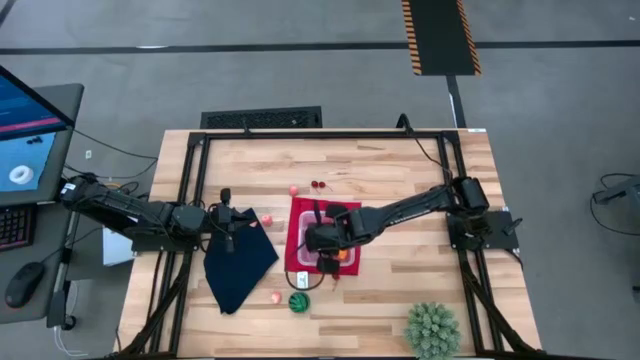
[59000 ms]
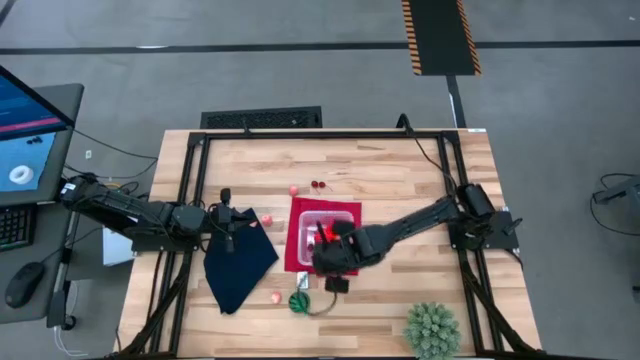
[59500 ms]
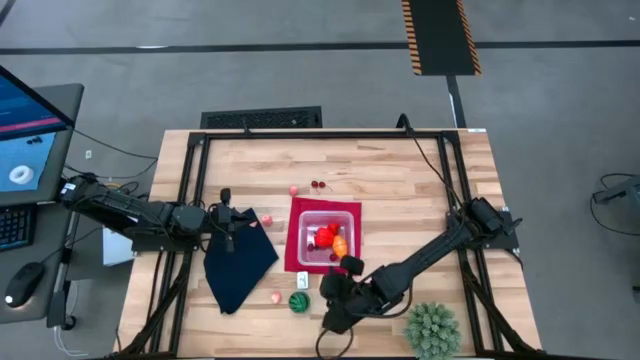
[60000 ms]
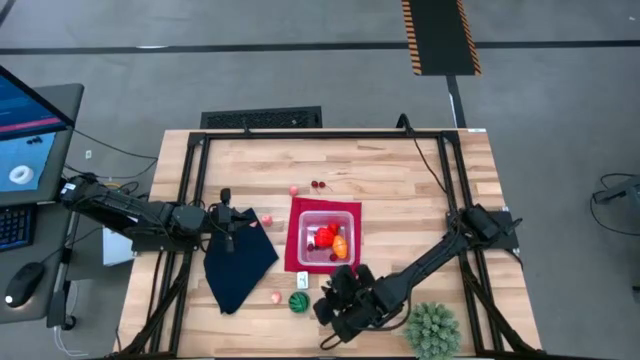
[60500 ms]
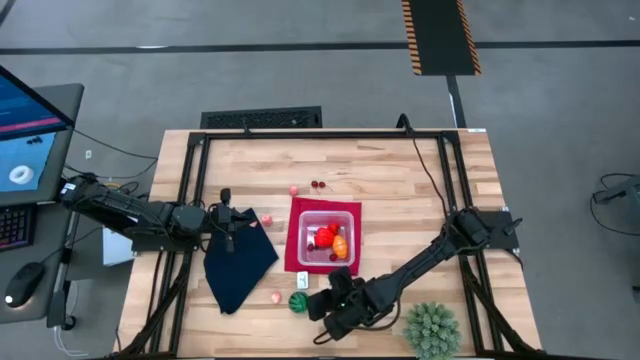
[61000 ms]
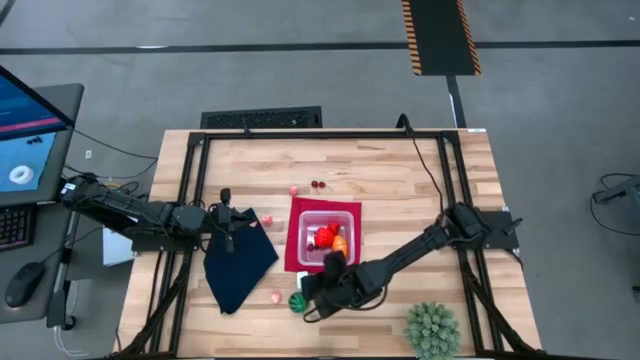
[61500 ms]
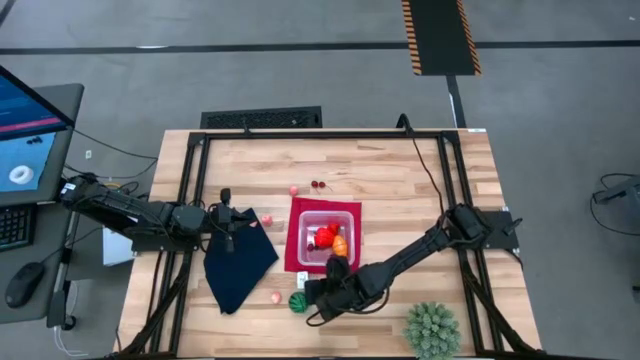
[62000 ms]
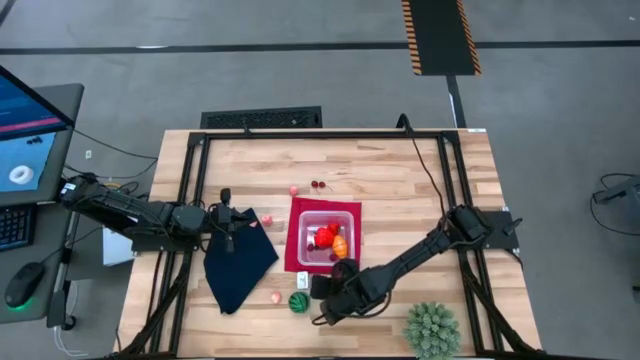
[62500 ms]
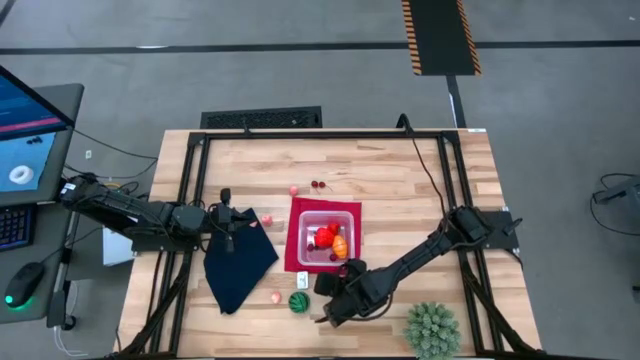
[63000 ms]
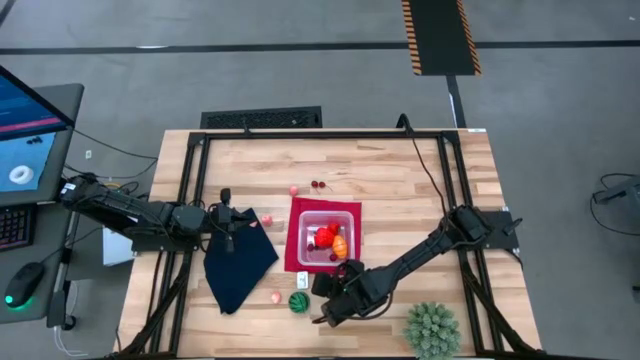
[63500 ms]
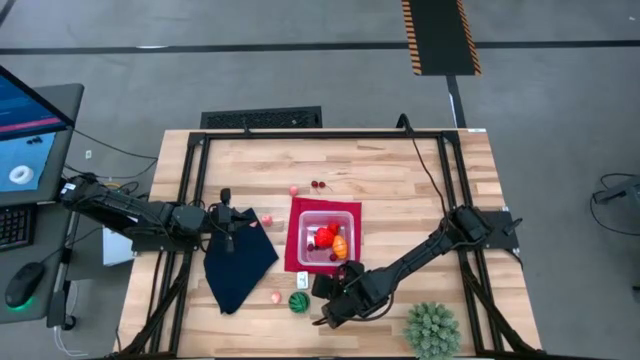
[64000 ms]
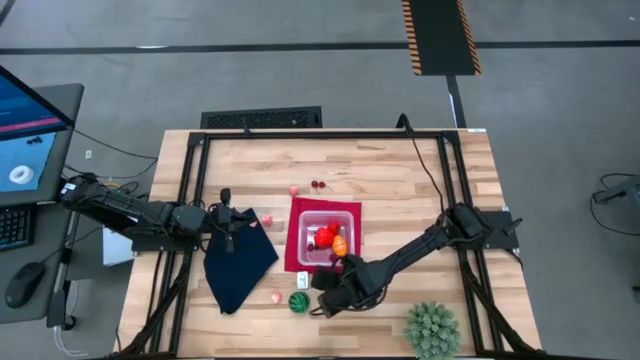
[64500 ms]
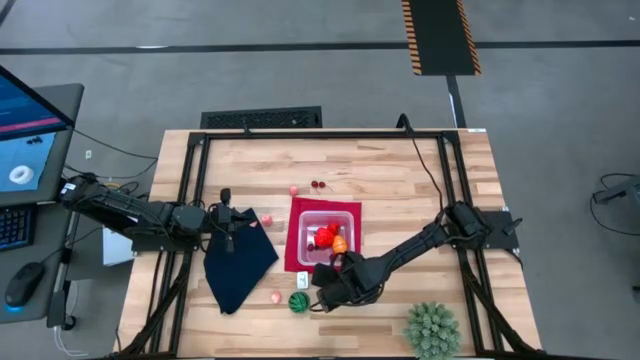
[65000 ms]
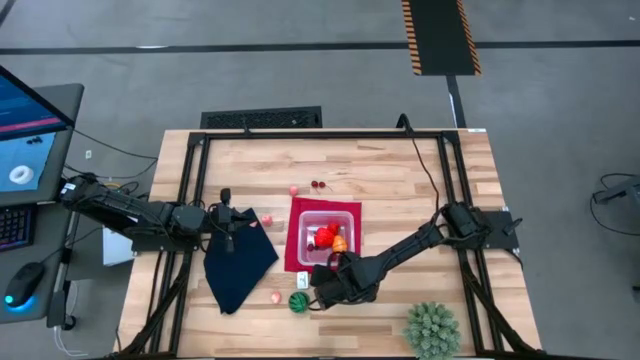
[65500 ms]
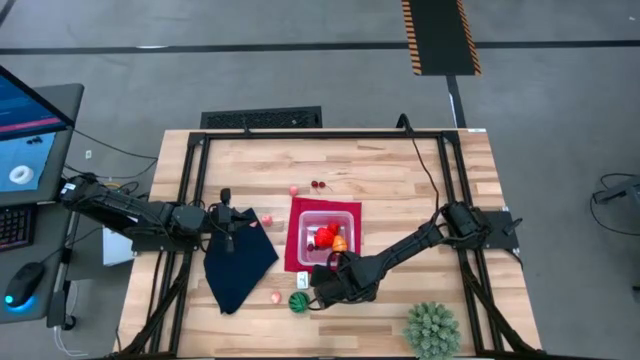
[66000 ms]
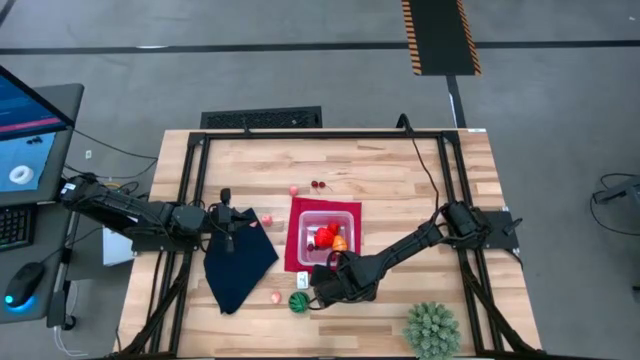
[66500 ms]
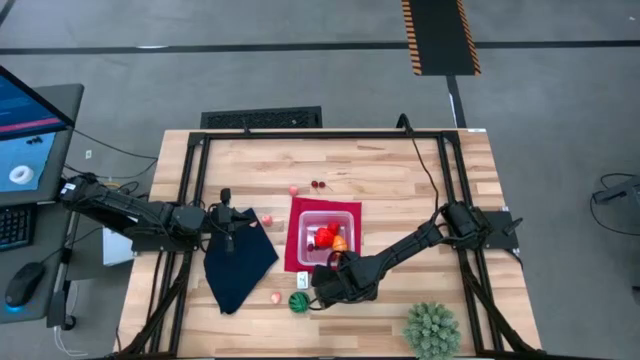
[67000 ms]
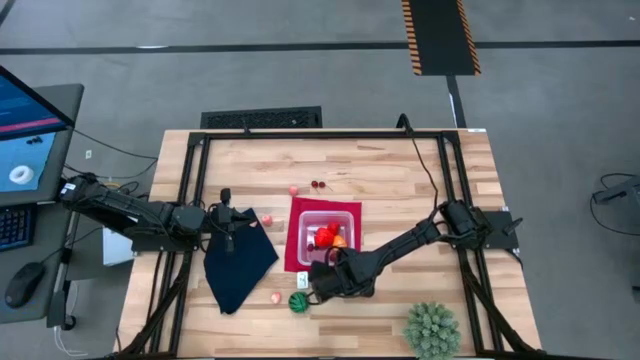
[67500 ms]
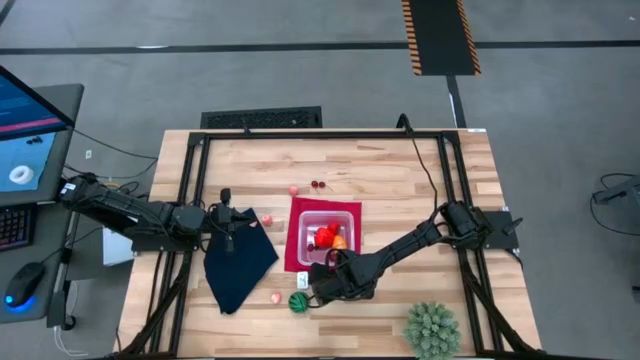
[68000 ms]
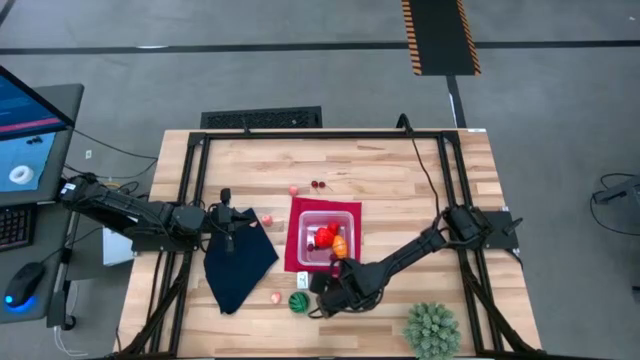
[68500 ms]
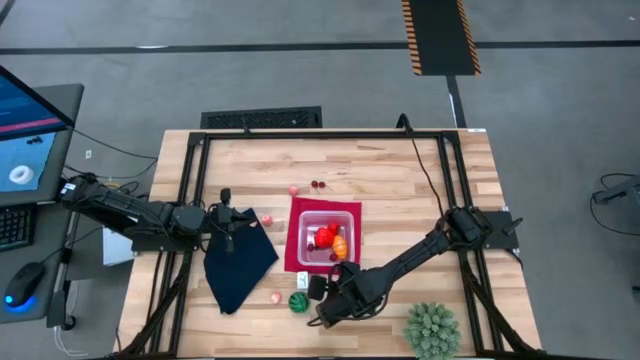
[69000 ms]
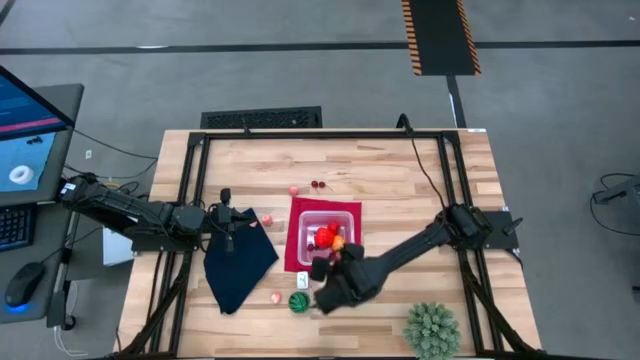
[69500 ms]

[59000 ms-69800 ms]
Task: Pick and placing Produce into tupperware
Put the cherry in the transparent bin

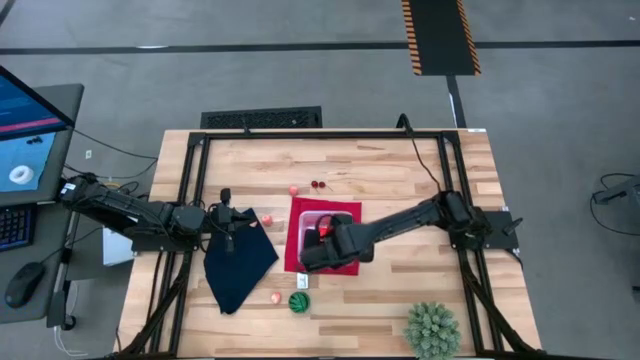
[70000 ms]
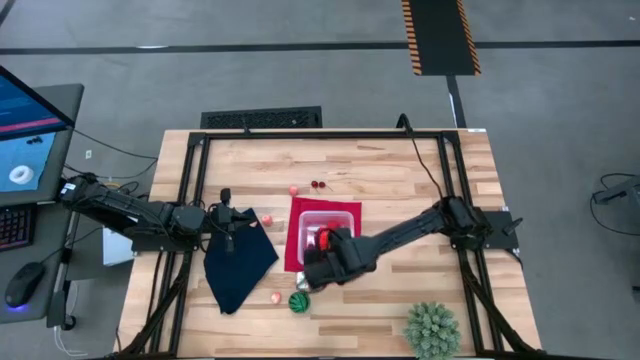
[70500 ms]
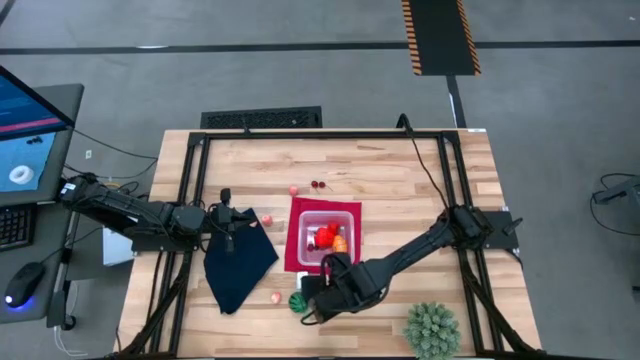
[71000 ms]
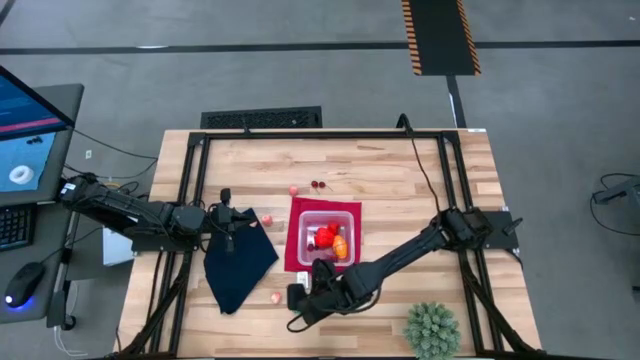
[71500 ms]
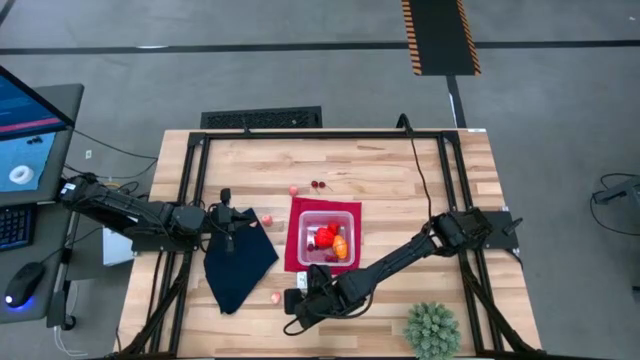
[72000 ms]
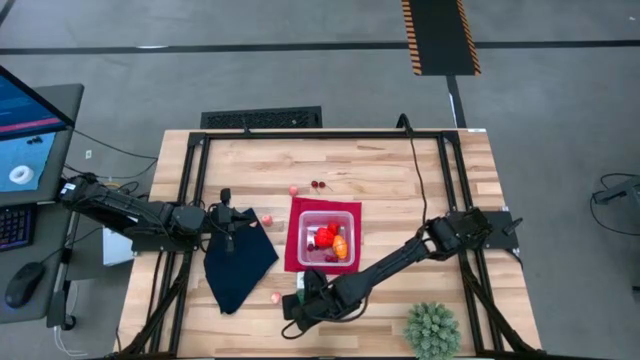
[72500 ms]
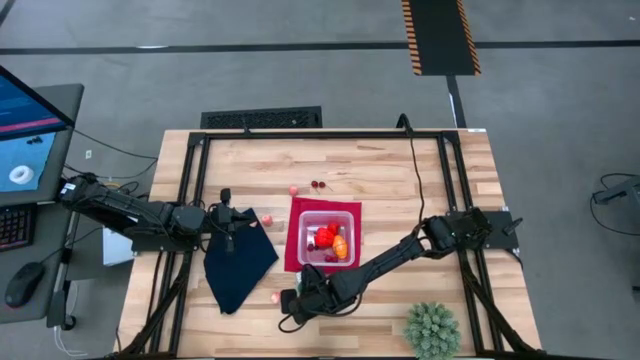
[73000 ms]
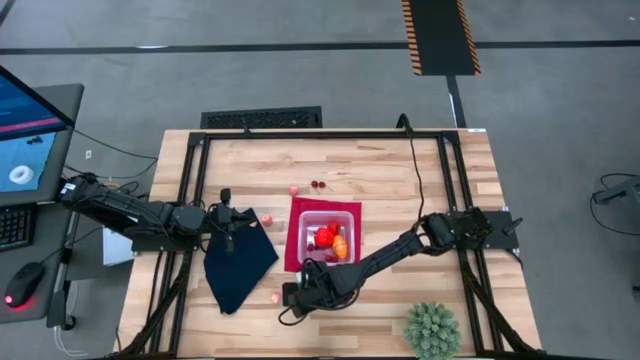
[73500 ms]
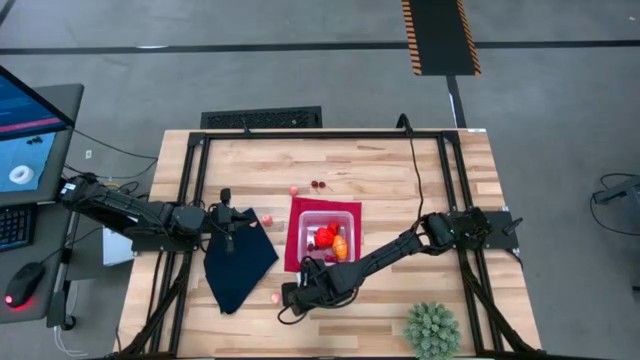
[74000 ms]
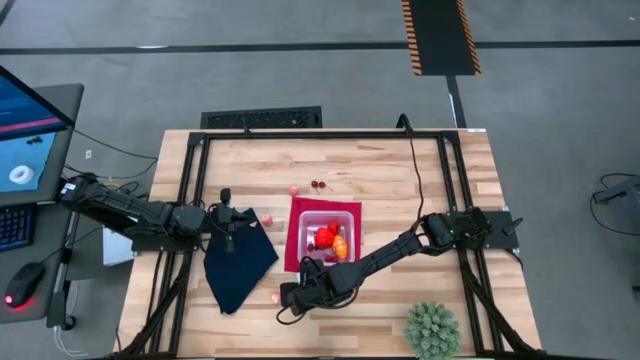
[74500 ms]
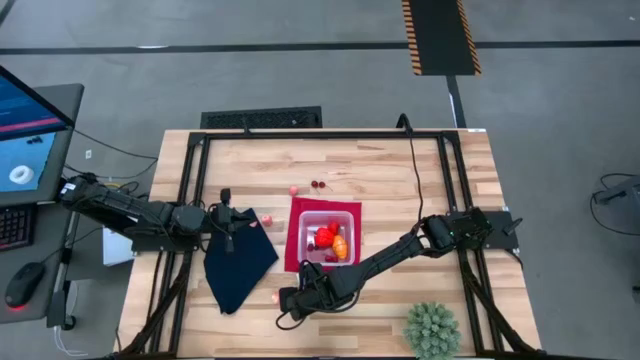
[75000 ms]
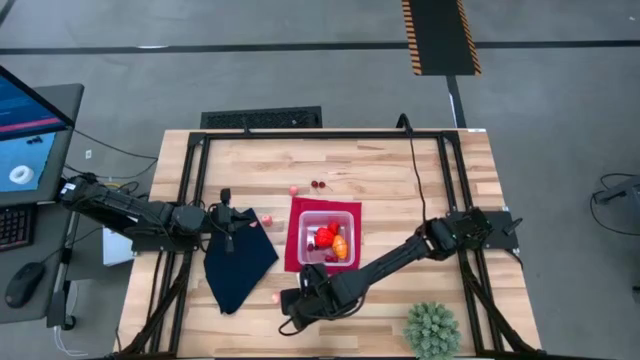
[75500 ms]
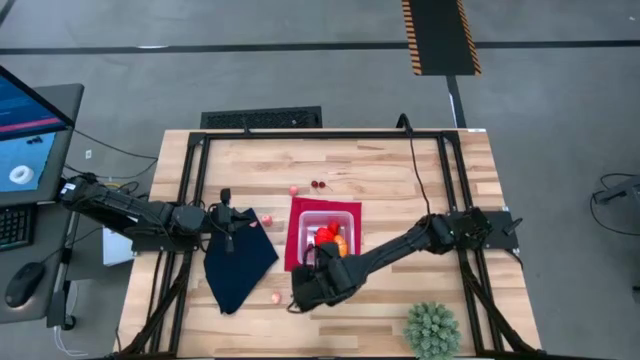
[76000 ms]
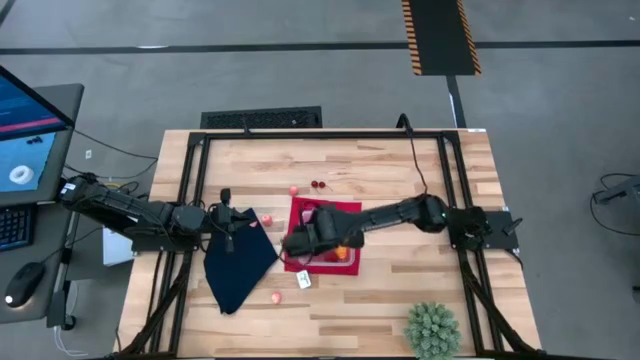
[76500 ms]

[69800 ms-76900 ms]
Put the watermelon in the transparent bin

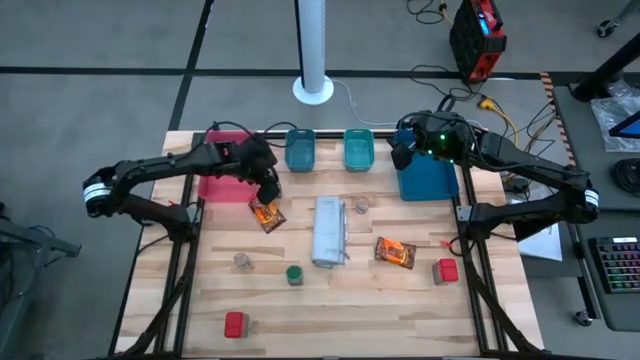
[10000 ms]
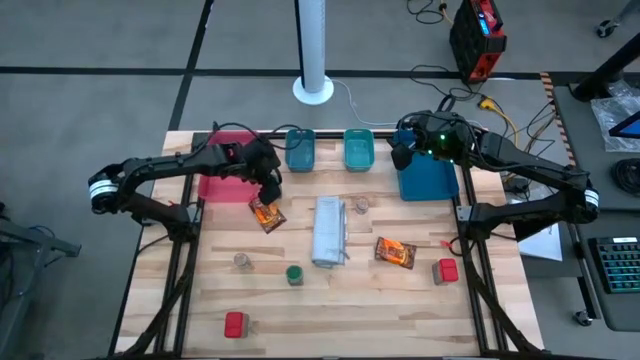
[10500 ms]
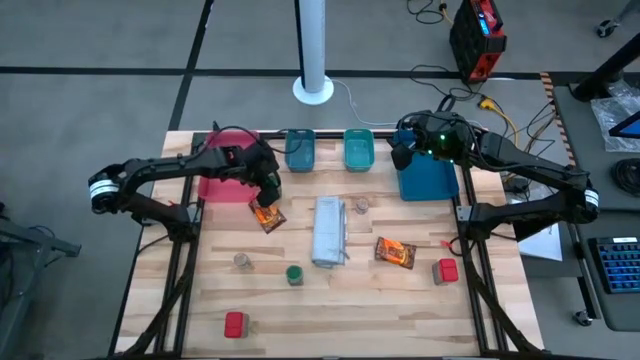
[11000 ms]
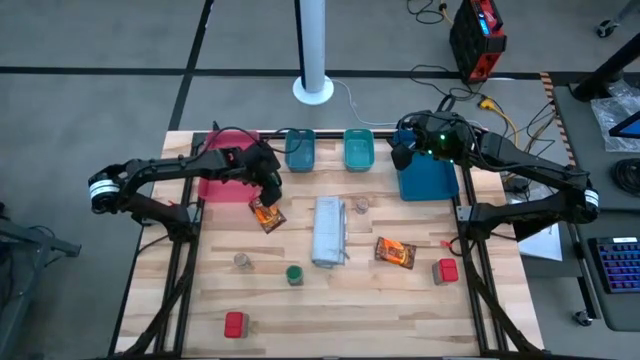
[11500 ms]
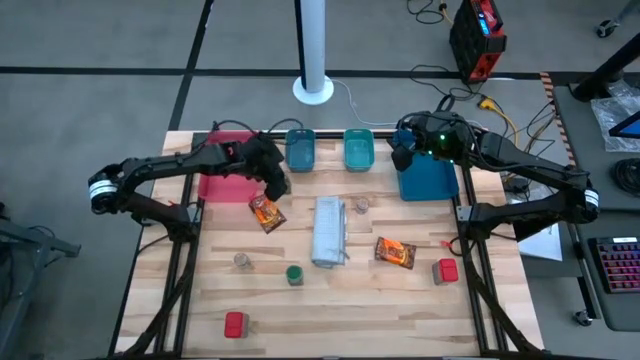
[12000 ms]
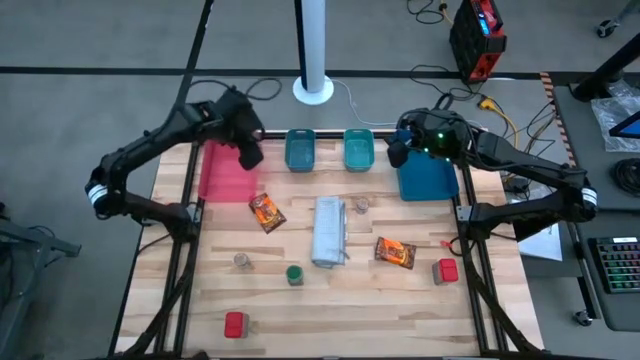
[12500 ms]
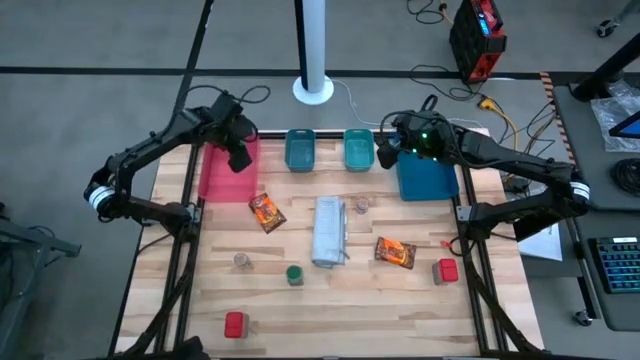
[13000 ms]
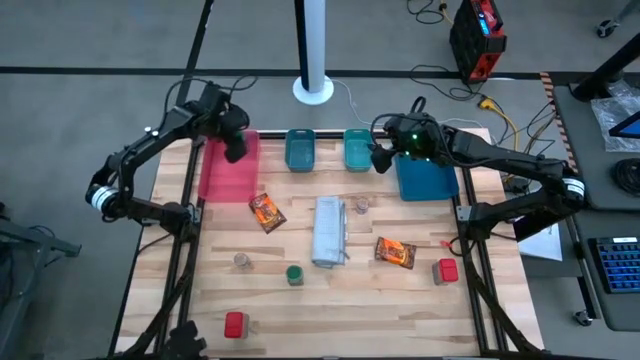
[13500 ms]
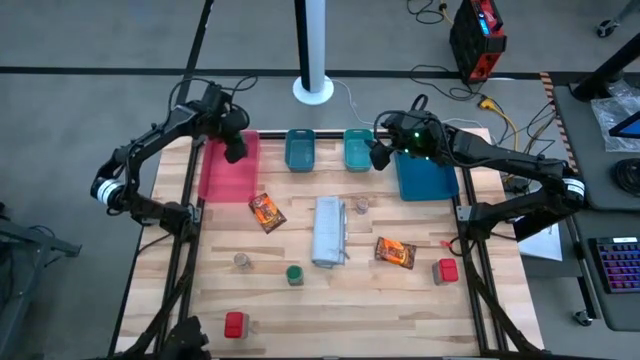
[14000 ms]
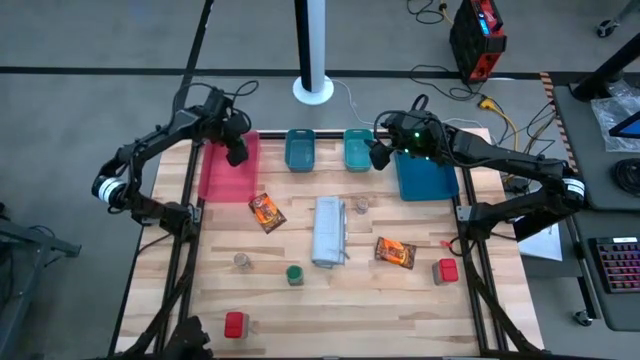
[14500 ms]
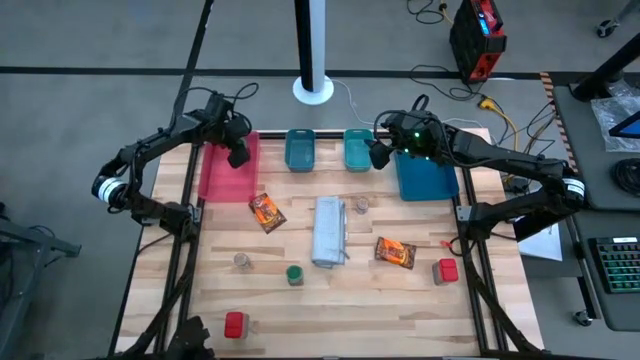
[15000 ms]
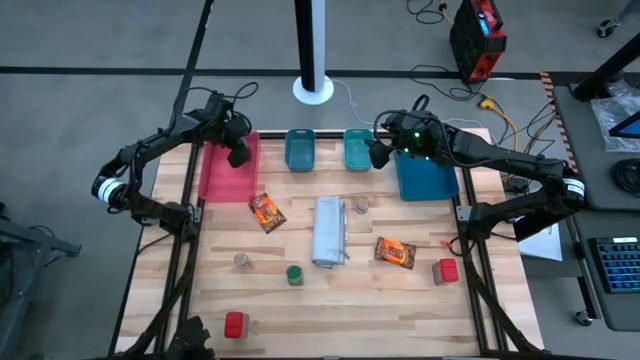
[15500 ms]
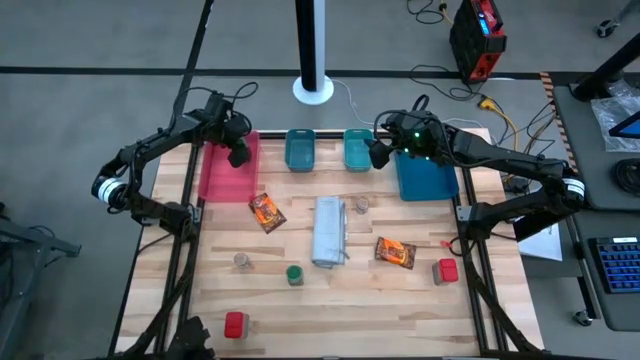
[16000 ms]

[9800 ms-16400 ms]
Task: Sort spices by type
Put the top green seasoning bottle into the pink bin
